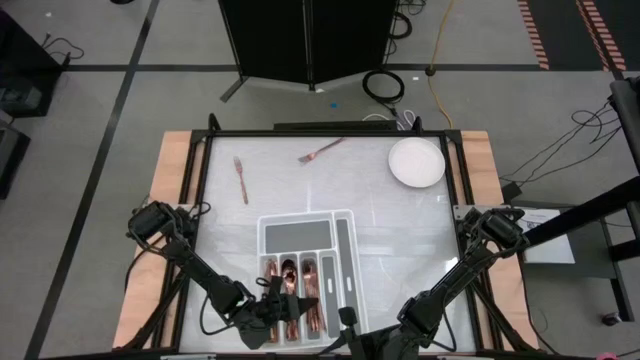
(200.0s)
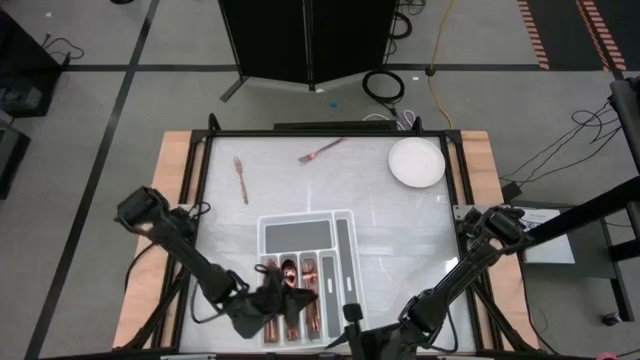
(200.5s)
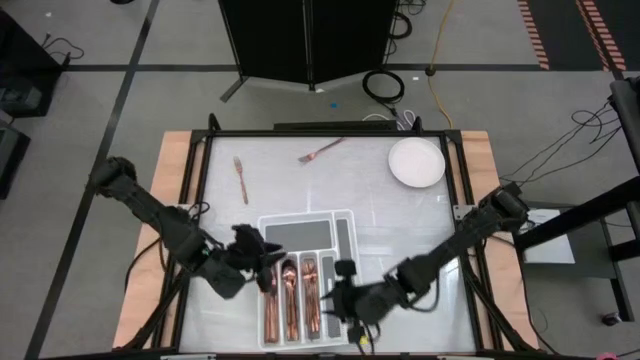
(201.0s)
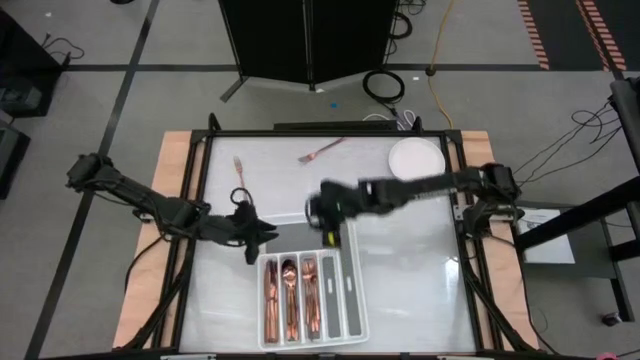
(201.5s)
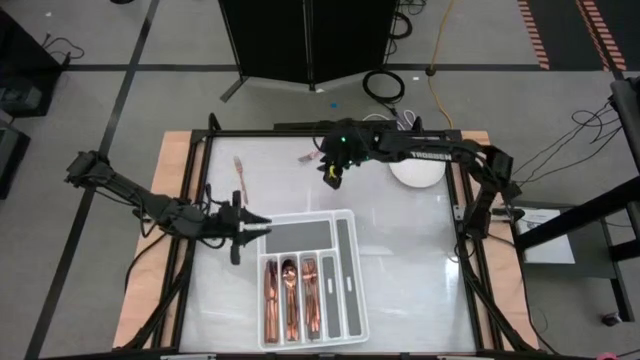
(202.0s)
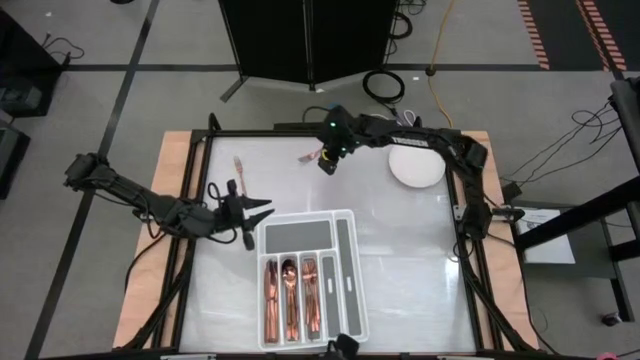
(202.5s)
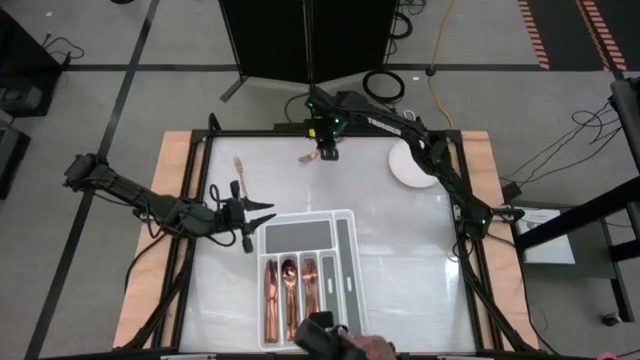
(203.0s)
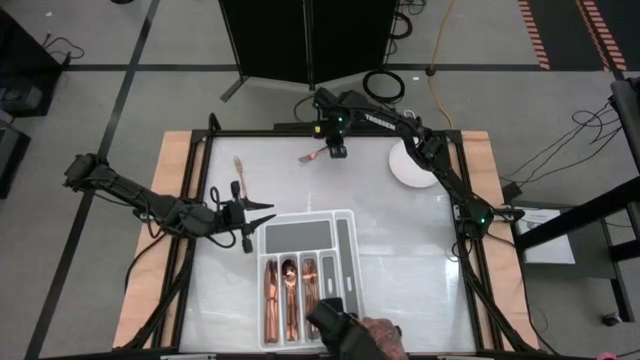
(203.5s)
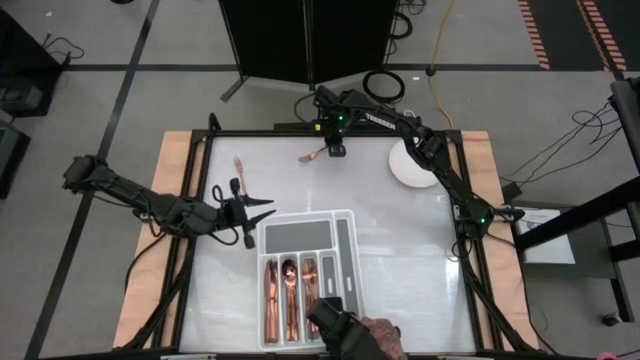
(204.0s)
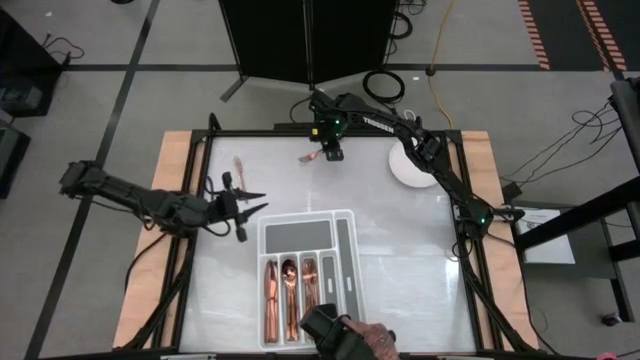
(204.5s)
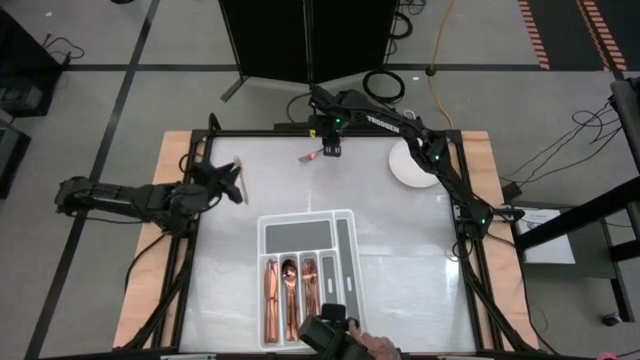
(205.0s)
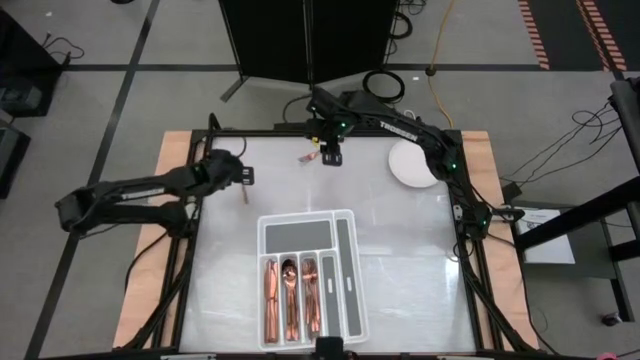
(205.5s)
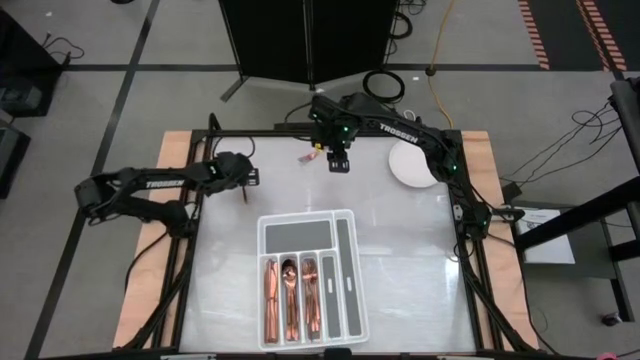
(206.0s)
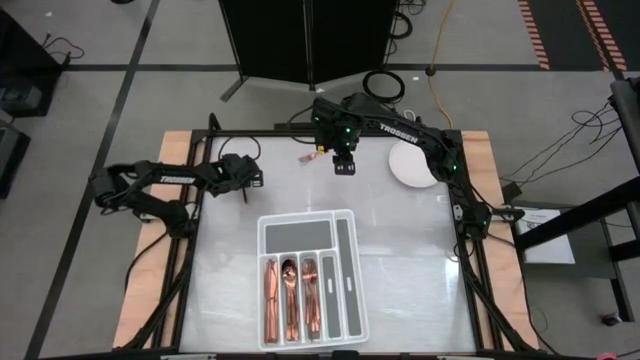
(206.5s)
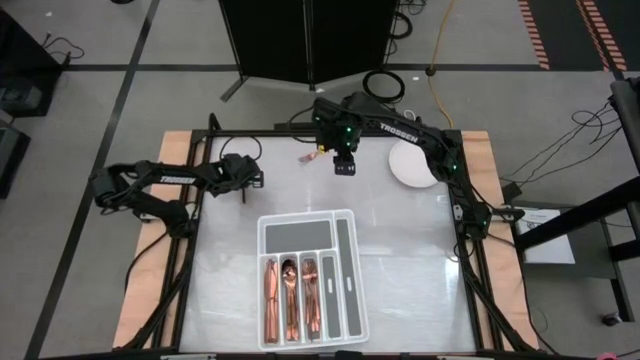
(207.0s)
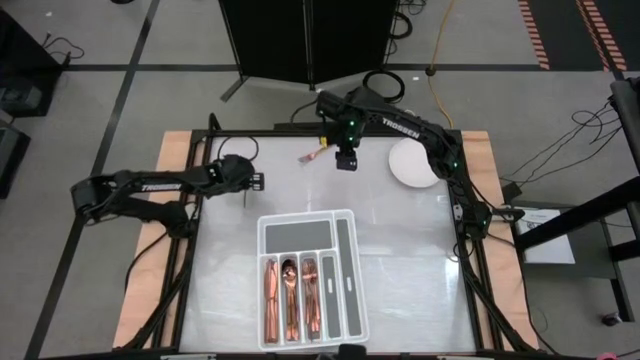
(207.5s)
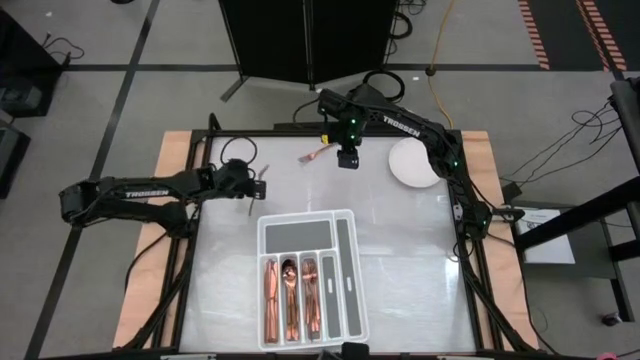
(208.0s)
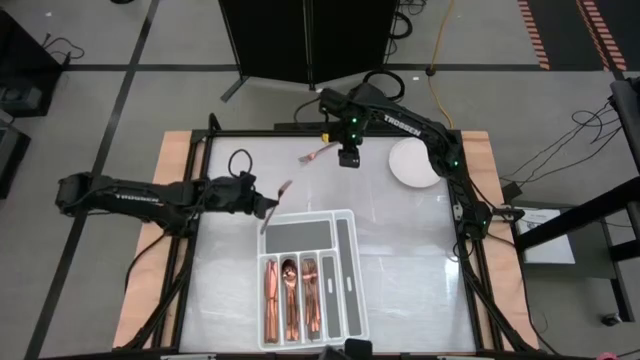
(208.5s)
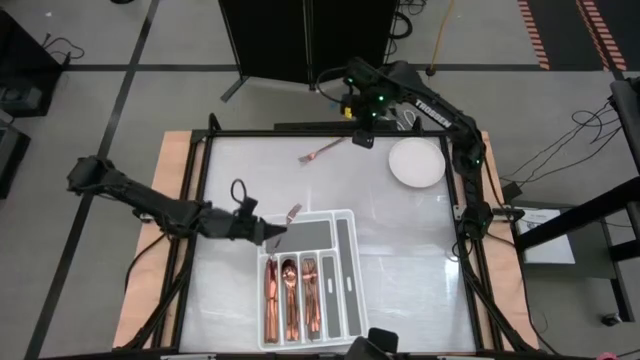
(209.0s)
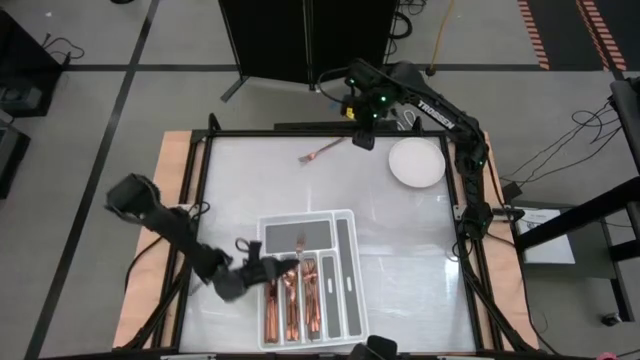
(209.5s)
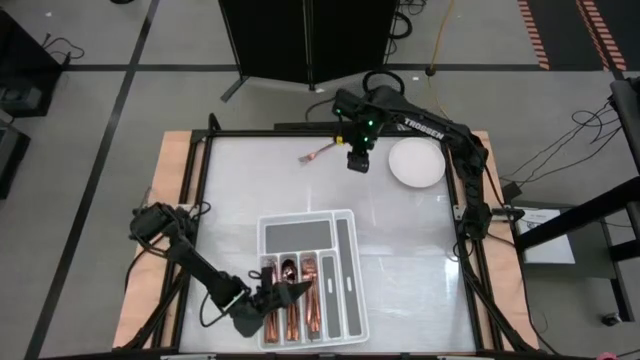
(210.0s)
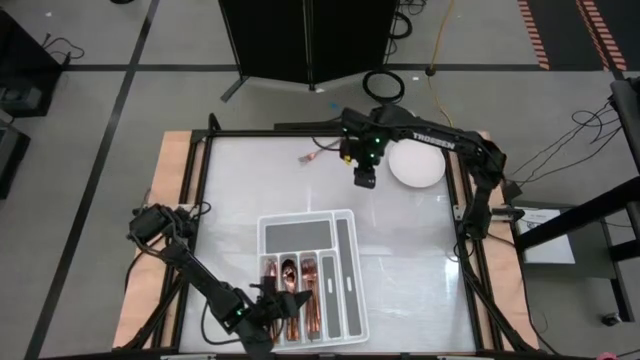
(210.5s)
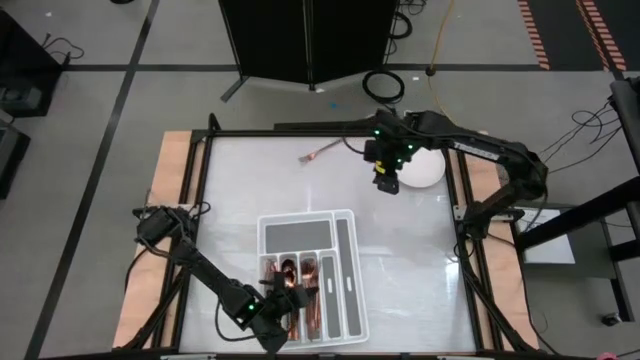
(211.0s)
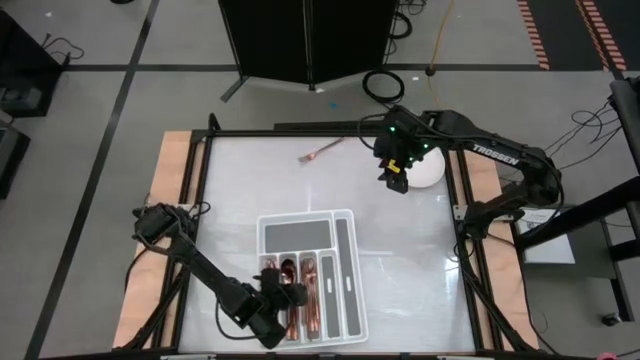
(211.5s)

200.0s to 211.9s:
Task: Sort silverware
Put the left fork into the silverware tray
